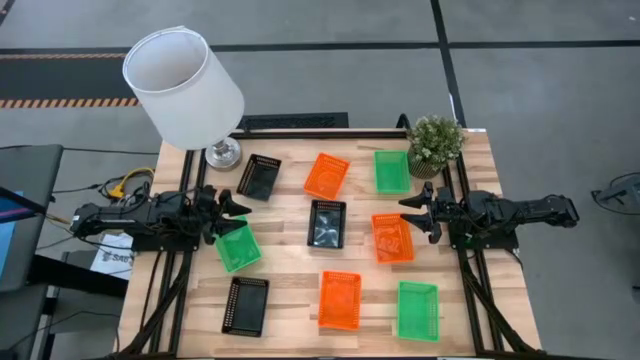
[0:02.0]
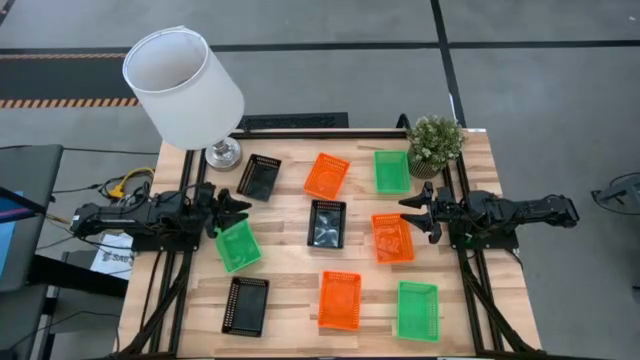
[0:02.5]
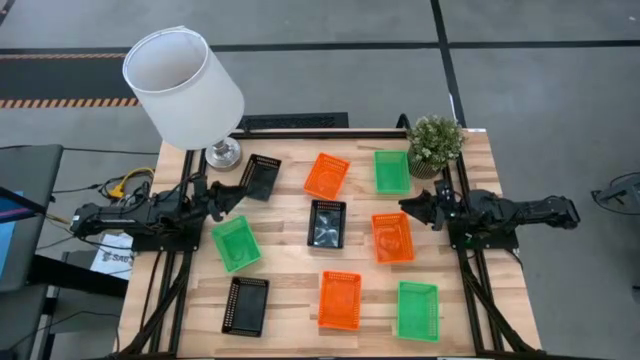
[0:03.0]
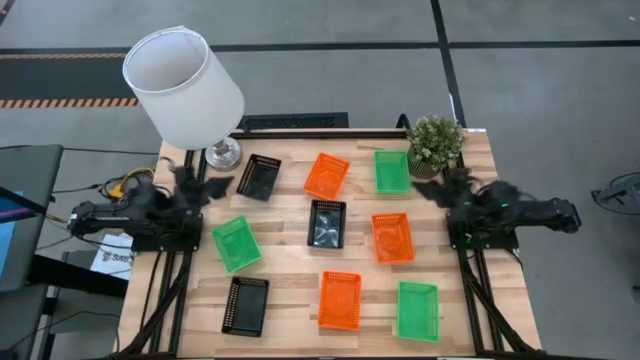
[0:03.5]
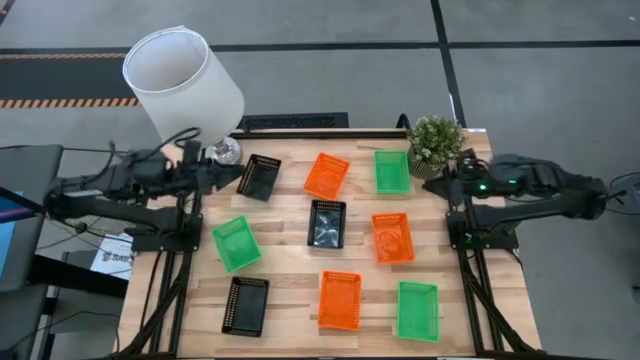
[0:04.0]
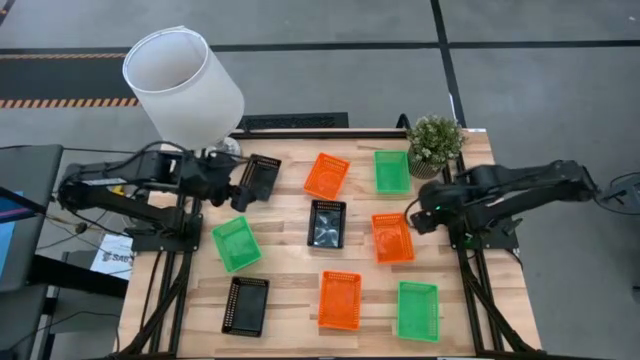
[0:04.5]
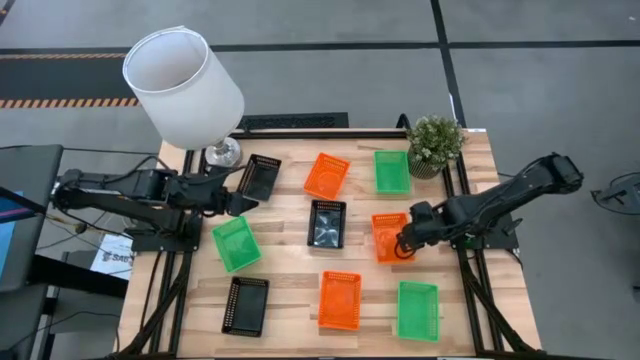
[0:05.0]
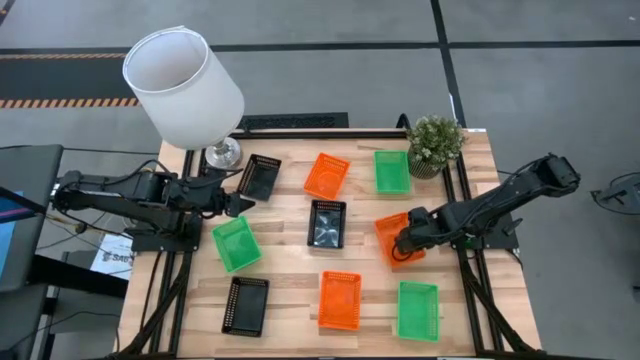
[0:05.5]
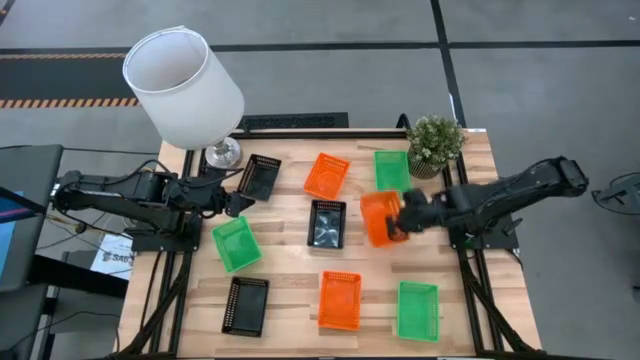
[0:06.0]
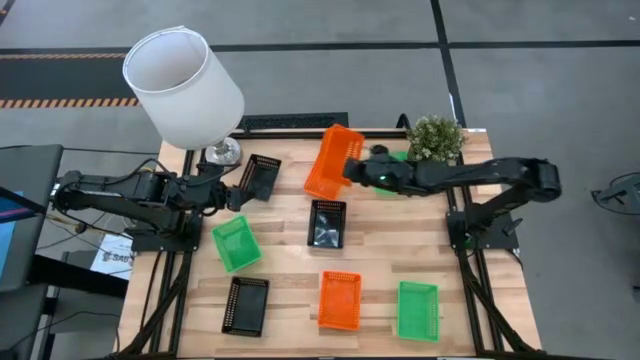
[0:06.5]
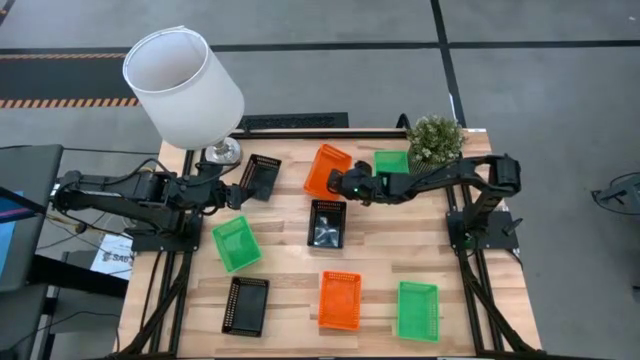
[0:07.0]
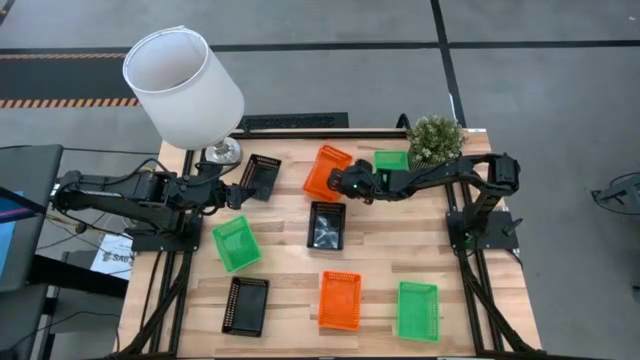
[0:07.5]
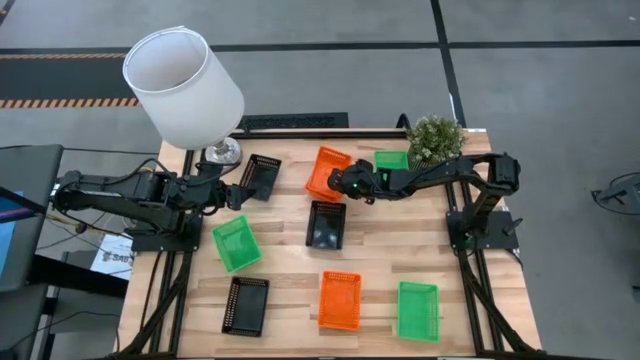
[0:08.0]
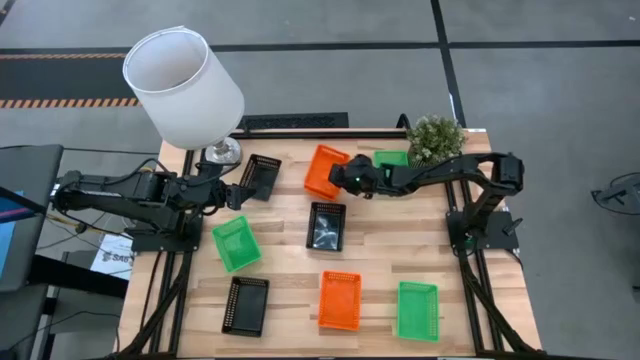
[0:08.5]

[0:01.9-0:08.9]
Stack the middle orange bin on top of the top orange bin

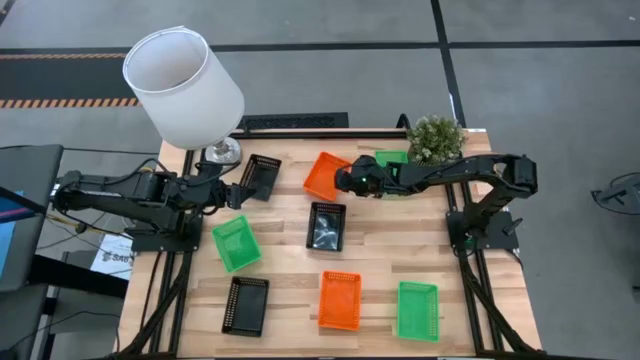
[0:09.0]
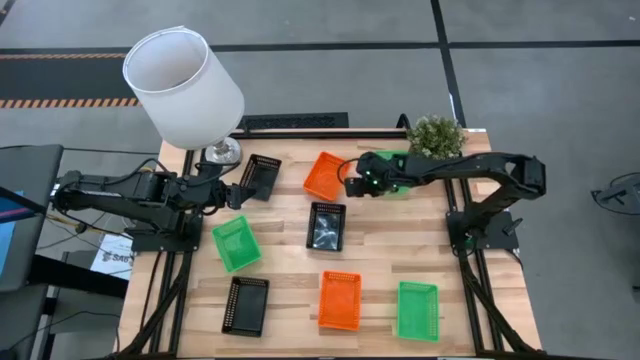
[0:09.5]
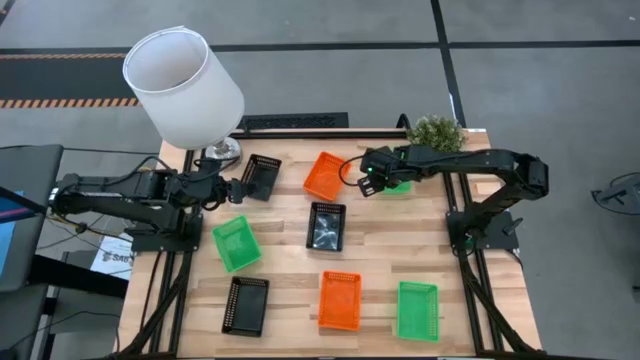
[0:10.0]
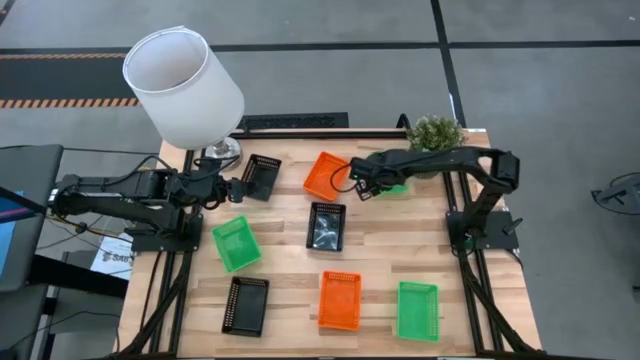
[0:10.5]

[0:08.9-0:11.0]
Prepare the top green bin

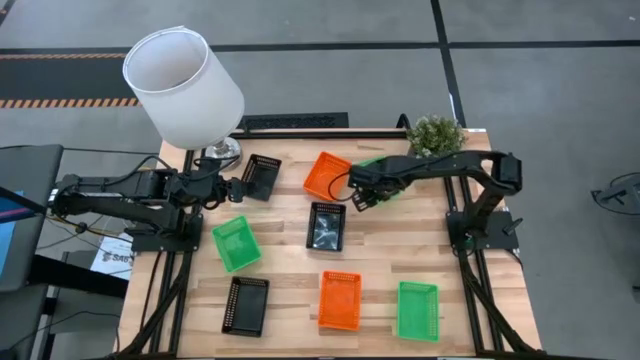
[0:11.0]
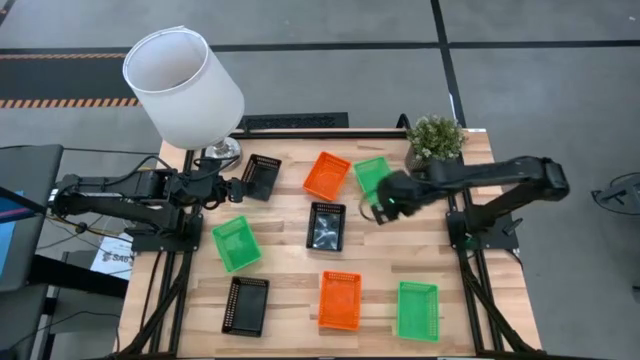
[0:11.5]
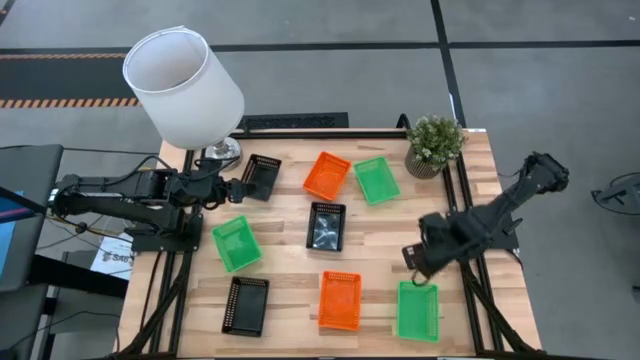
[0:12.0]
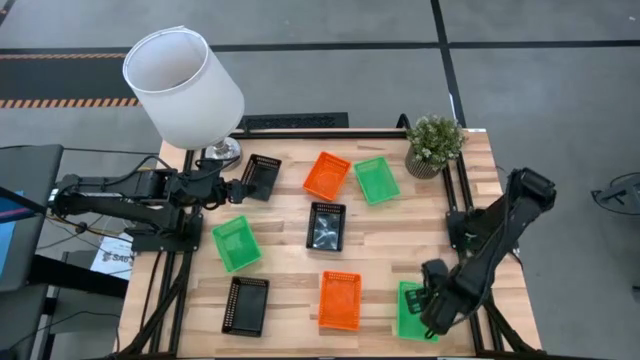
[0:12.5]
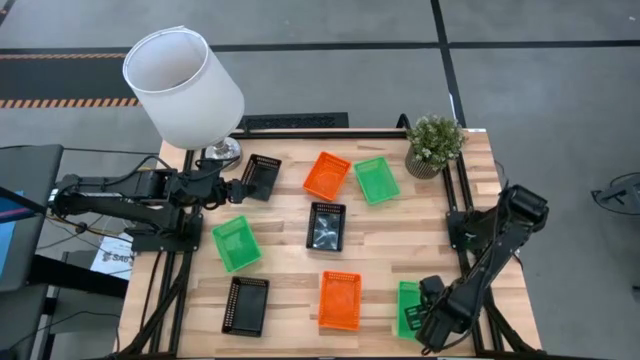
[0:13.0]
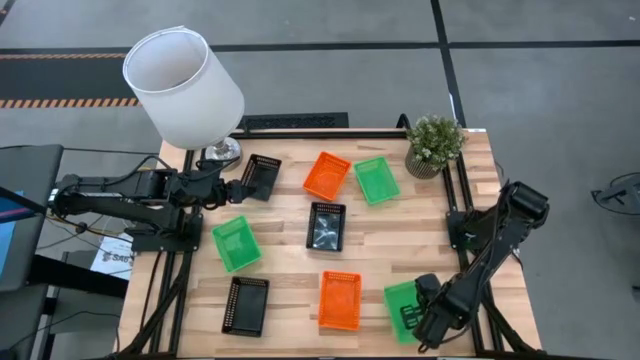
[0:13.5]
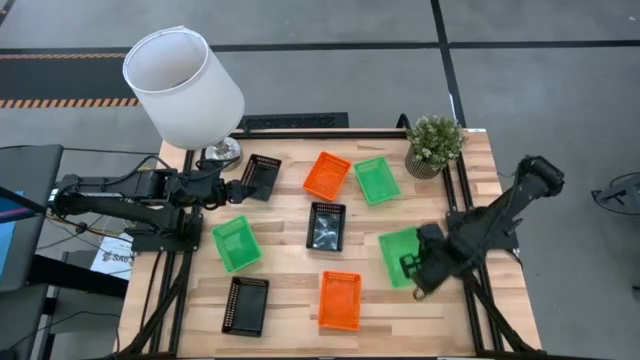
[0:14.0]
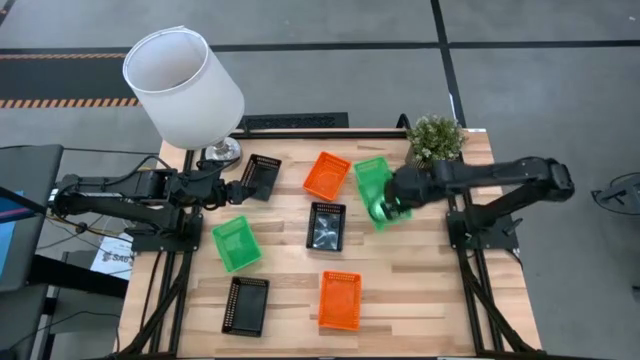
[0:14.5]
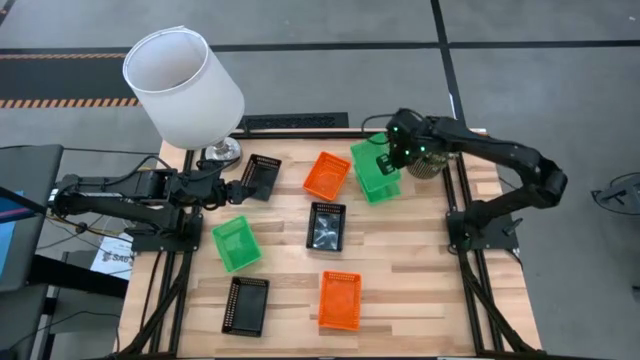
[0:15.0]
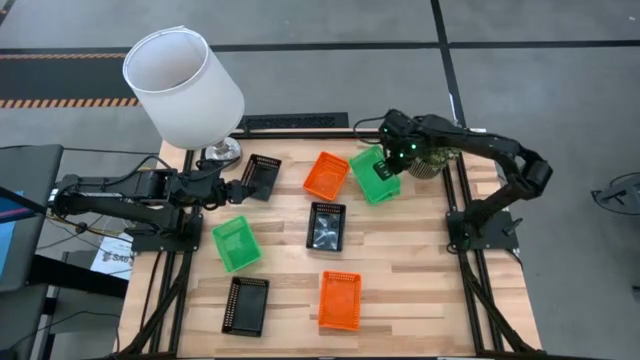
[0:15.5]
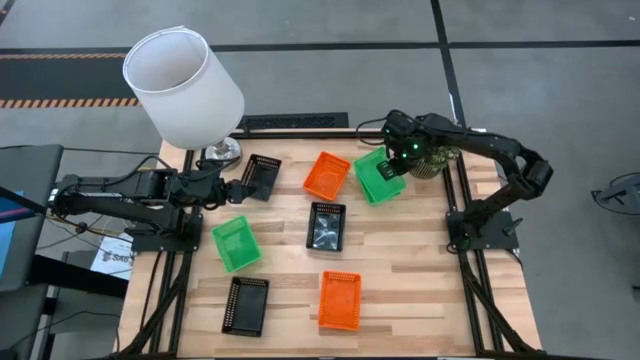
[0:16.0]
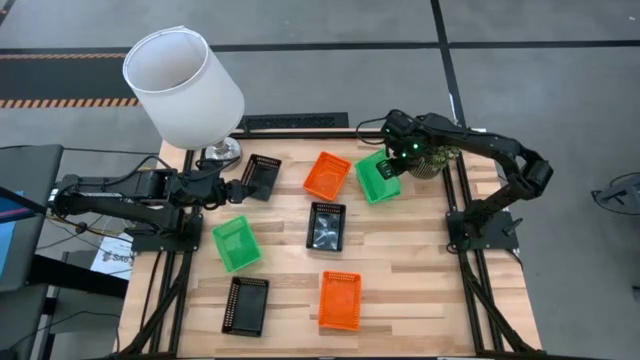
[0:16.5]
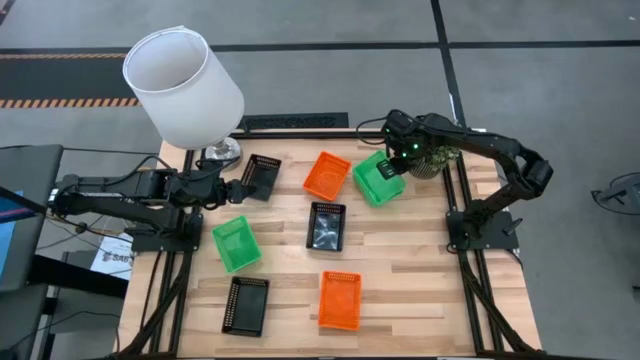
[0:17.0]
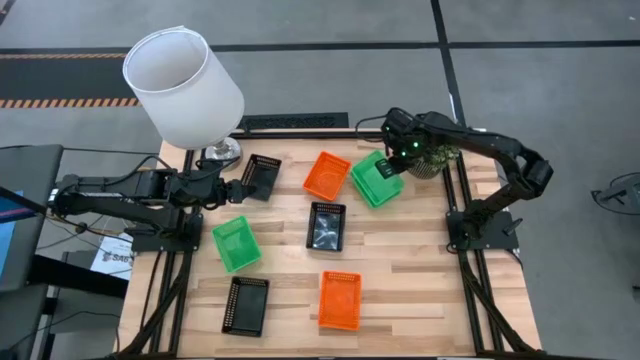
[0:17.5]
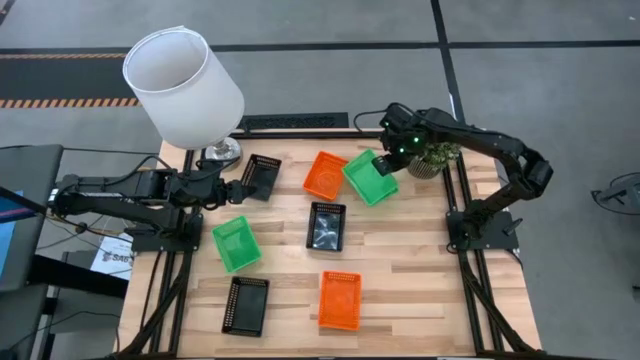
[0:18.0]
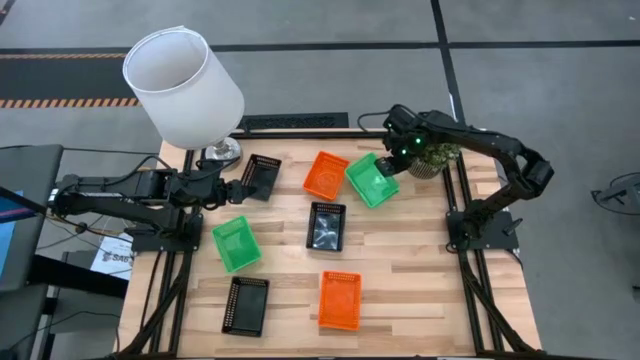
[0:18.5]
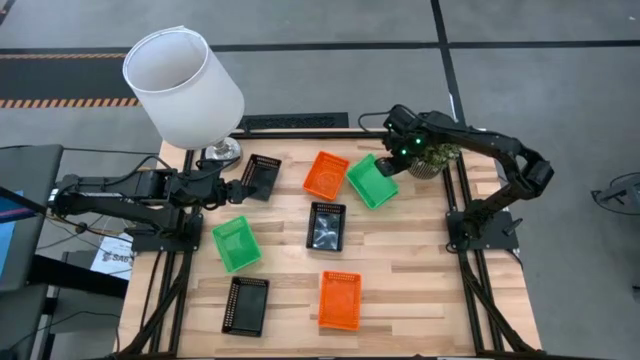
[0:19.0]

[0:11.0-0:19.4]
Stack the bottom green bin on top of the top green bin

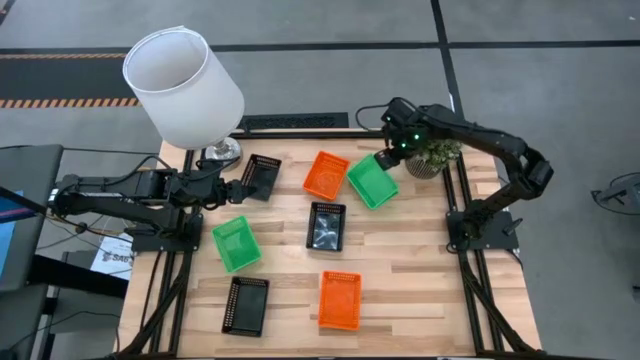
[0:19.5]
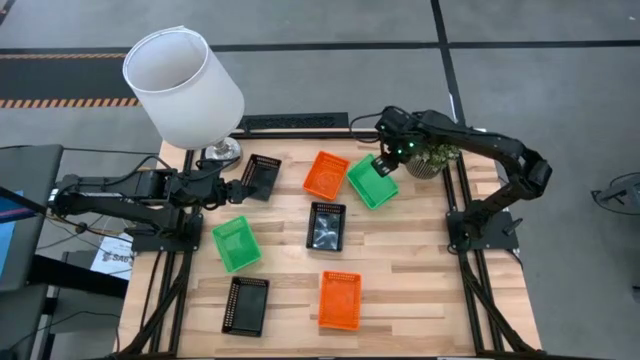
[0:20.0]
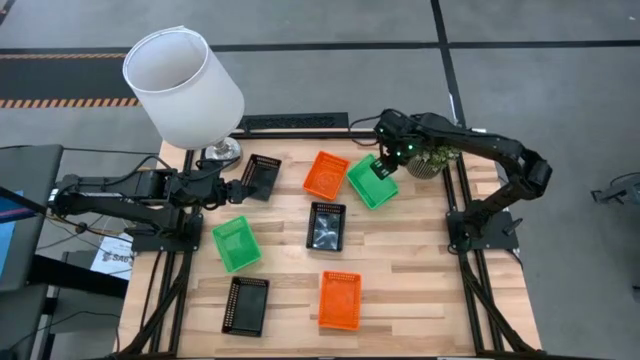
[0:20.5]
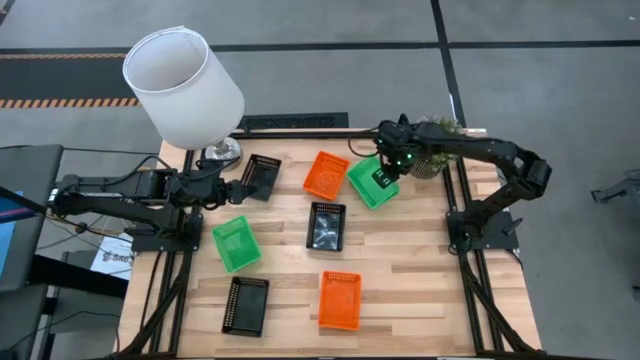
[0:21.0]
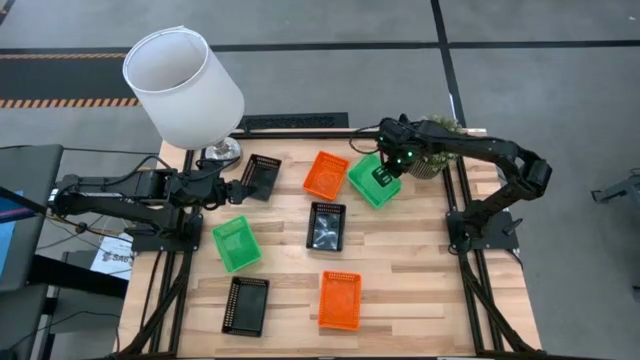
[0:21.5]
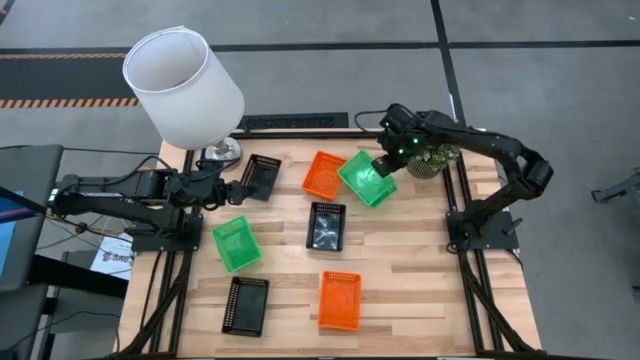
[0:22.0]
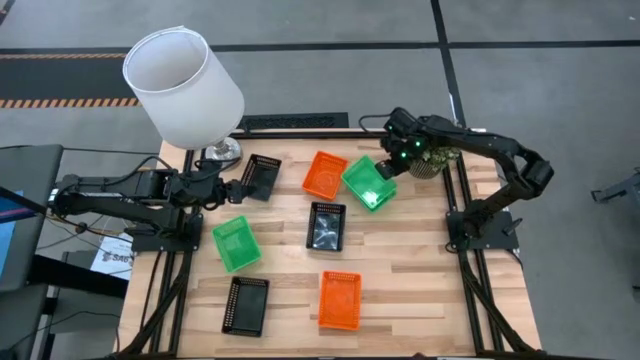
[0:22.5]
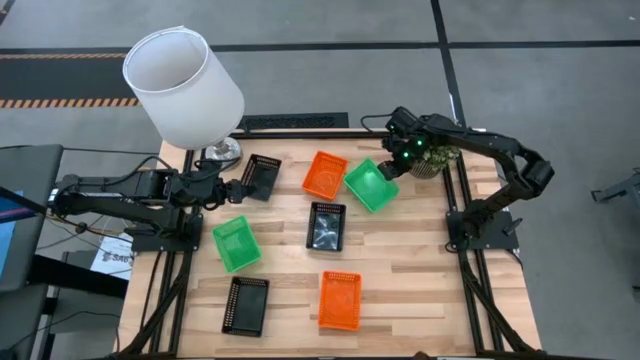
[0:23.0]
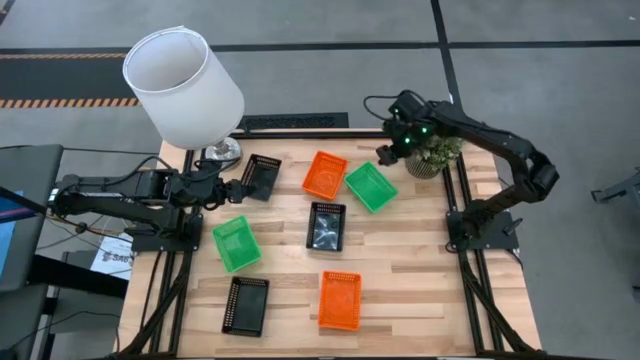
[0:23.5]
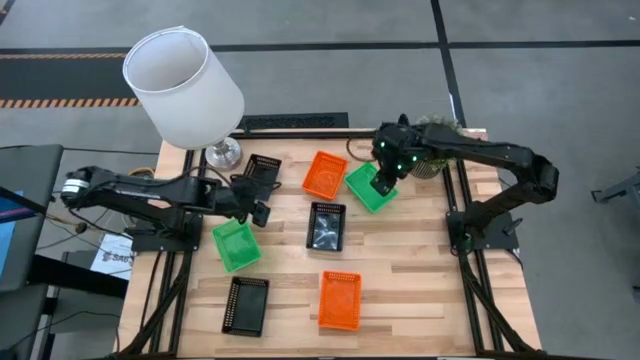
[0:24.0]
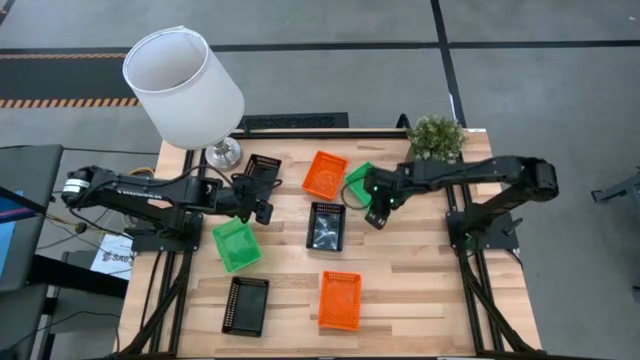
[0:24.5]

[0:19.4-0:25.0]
Stack the bottom green bin on top of the top green bin
